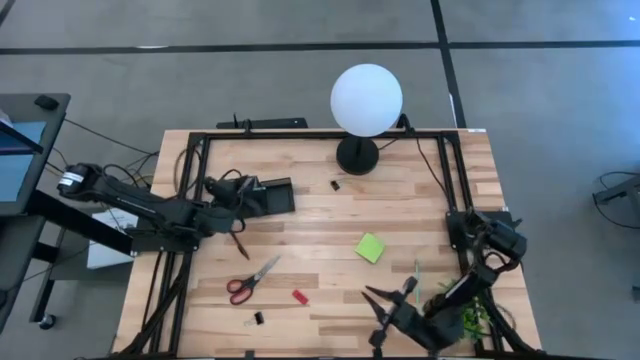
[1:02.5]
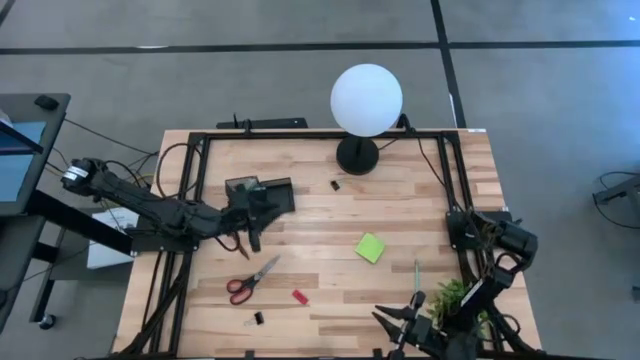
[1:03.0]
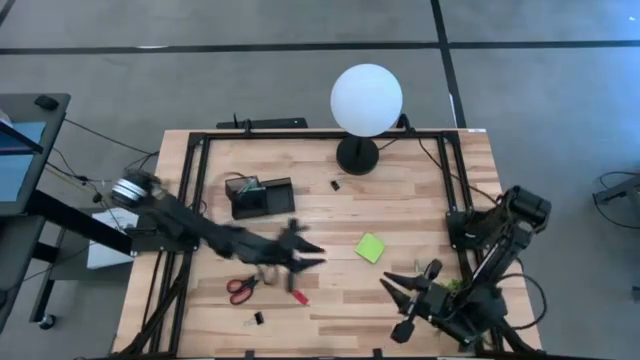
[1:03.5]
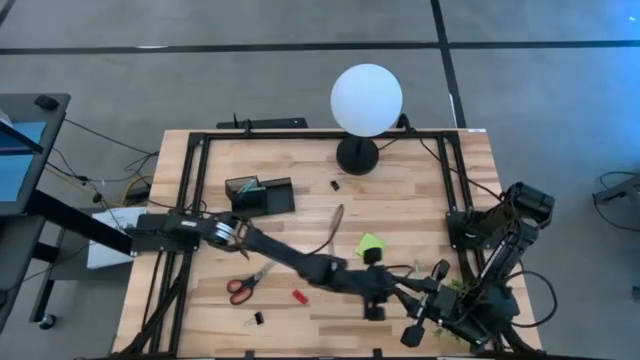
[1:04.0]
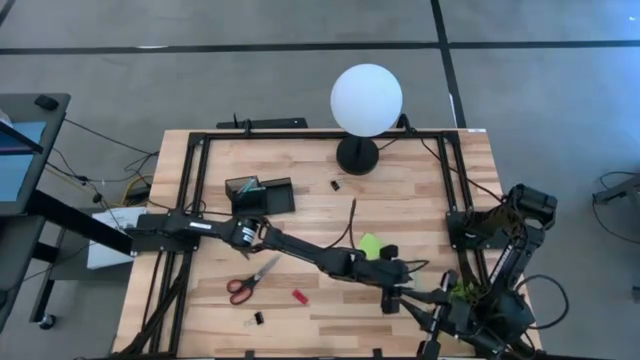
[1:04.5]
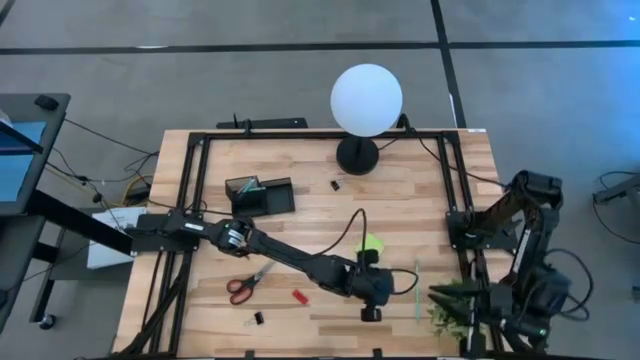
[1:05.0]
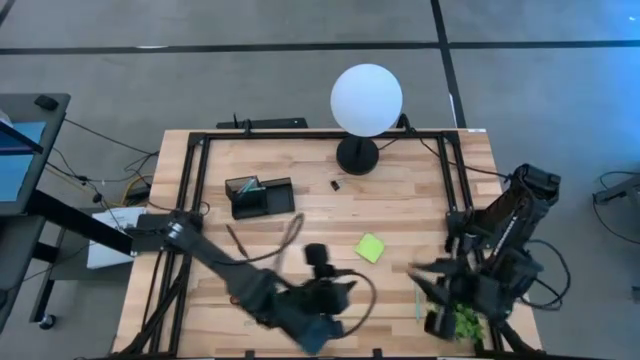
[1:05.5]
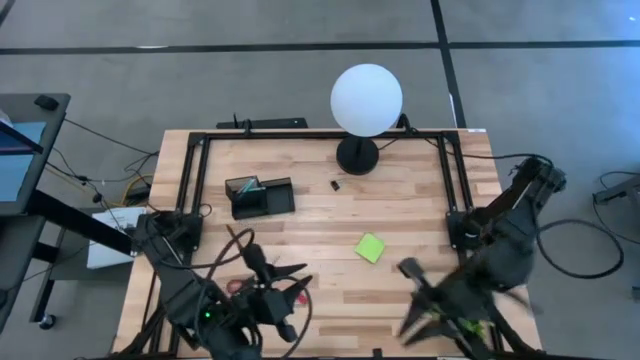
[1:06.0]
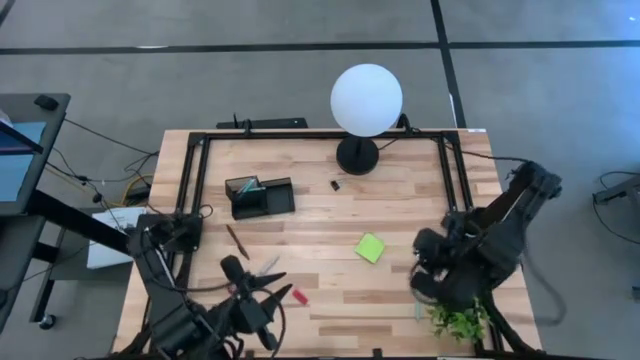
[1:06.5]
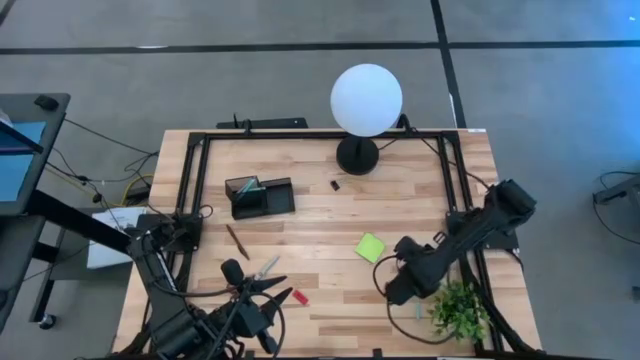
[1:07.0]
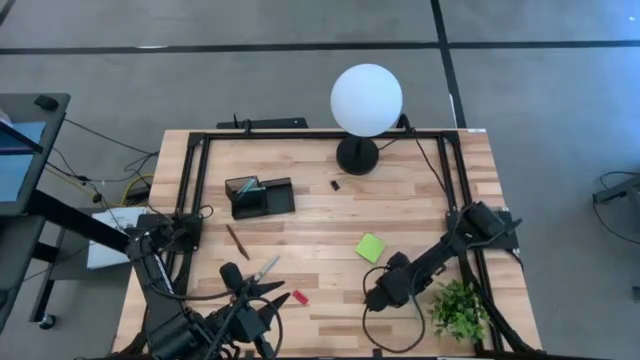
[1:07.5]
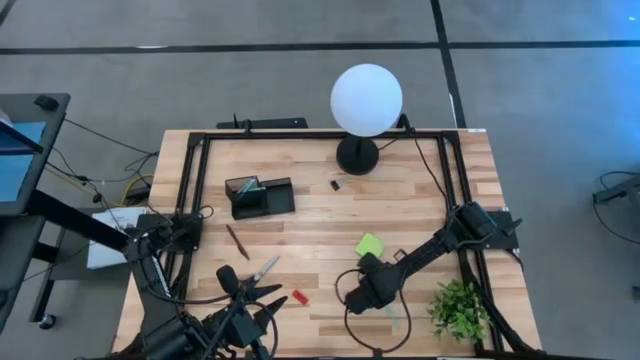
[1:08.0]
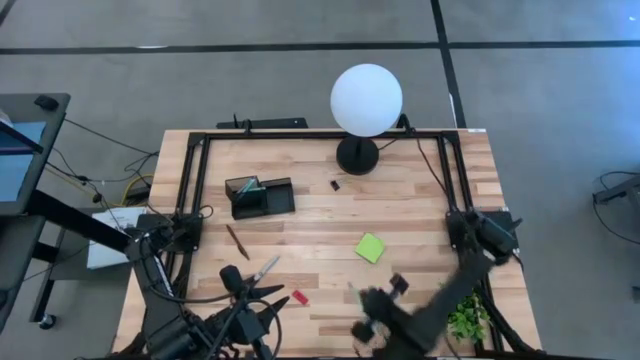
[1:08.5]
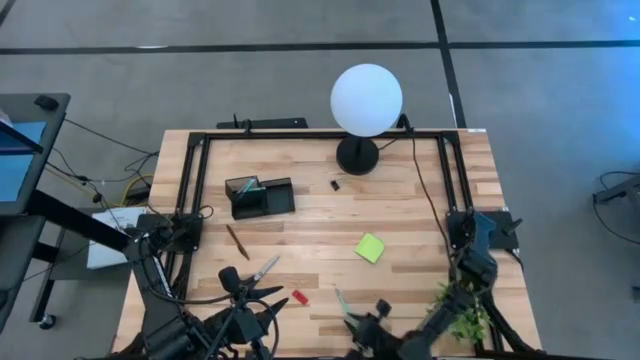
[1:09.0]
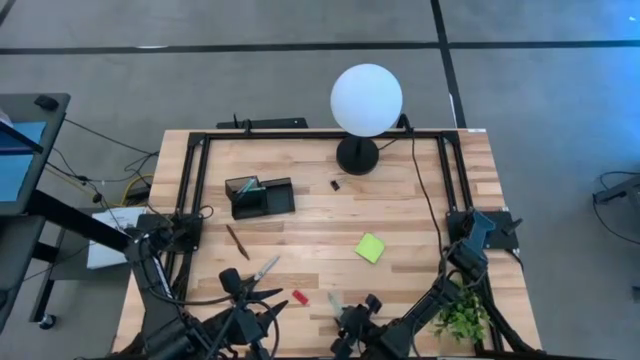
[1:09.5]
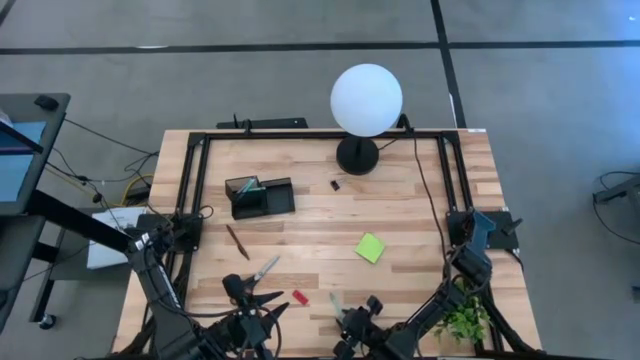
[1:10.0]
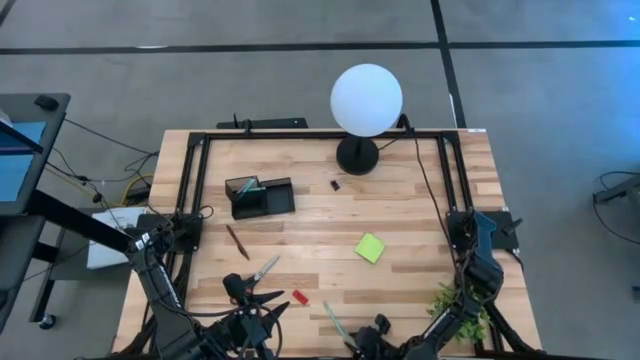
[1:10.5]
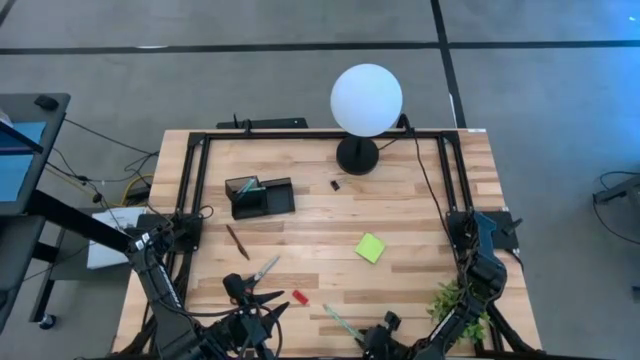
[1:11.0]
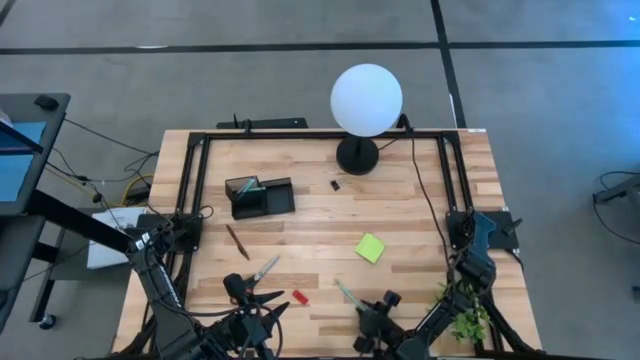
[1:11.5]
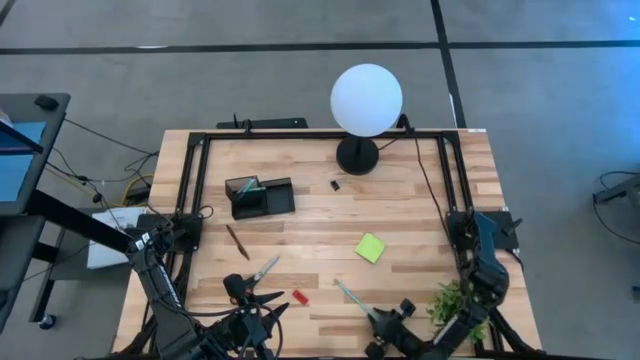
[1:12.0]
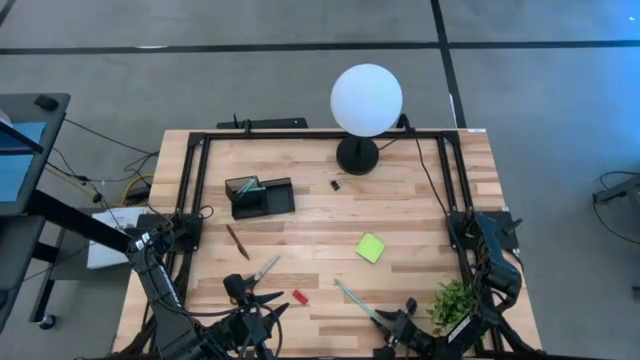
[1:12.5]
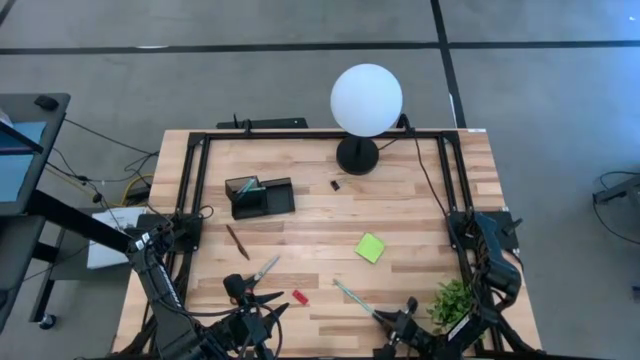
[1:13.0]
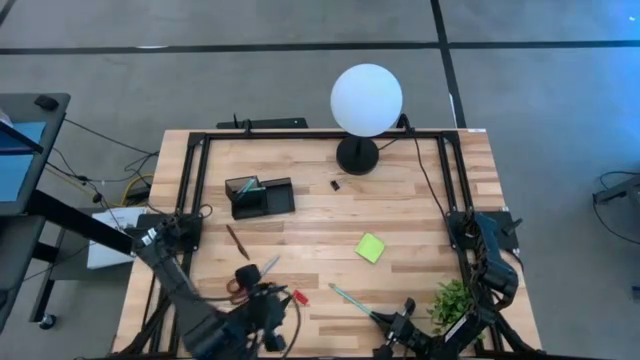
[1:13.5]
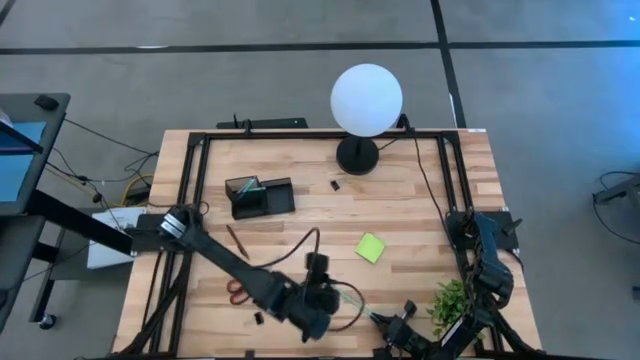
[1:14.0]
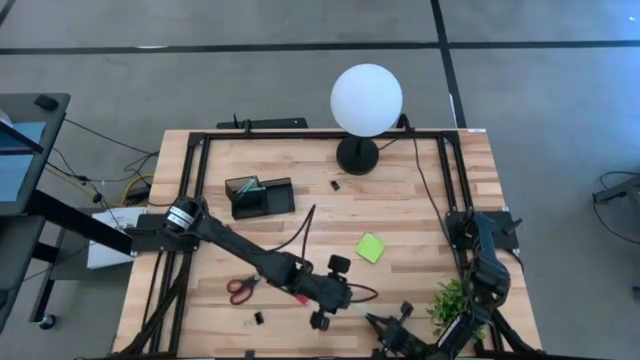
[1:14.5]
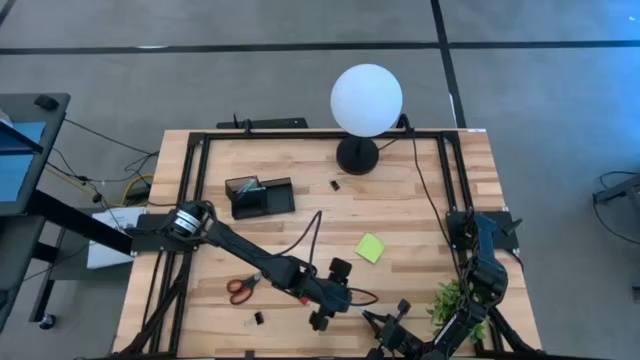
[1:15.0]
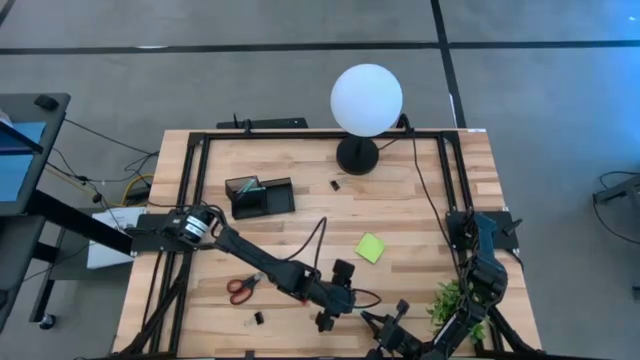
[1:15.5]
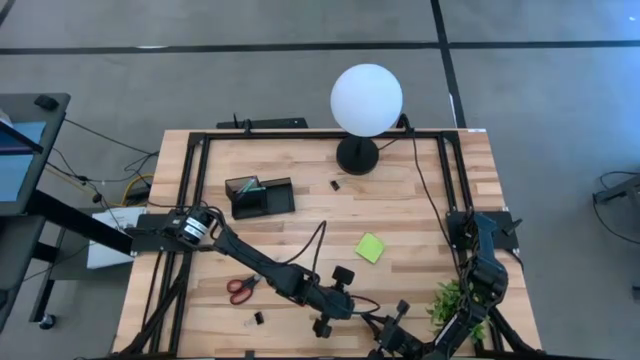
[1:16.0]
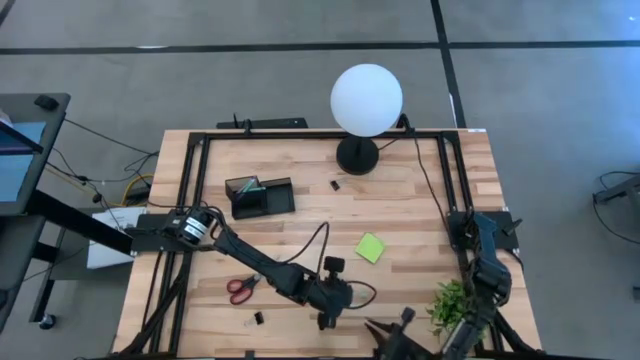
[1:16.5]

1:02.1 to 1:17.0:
Task: Pick and place office supplies into organizer
Put the blue pencil into the black desk organizer

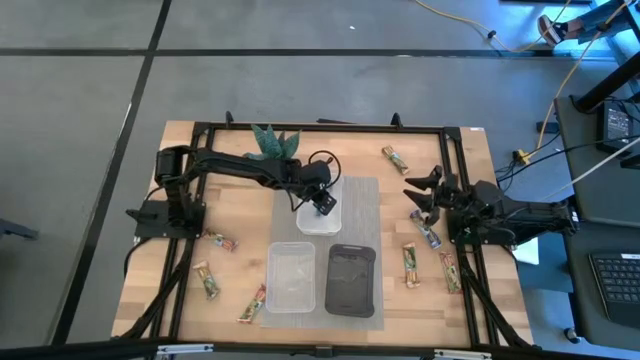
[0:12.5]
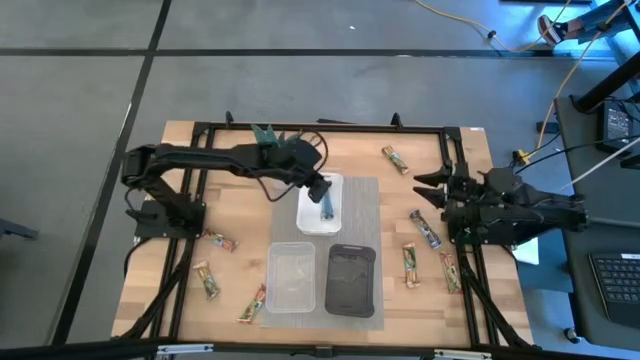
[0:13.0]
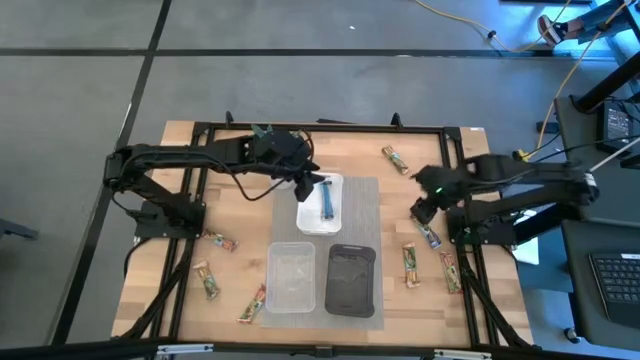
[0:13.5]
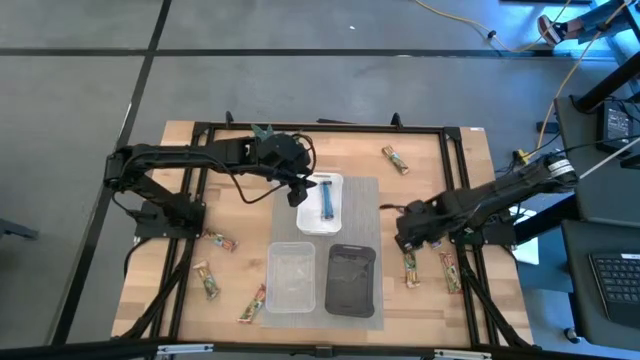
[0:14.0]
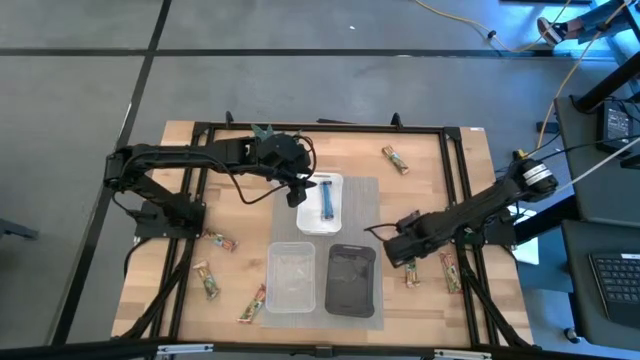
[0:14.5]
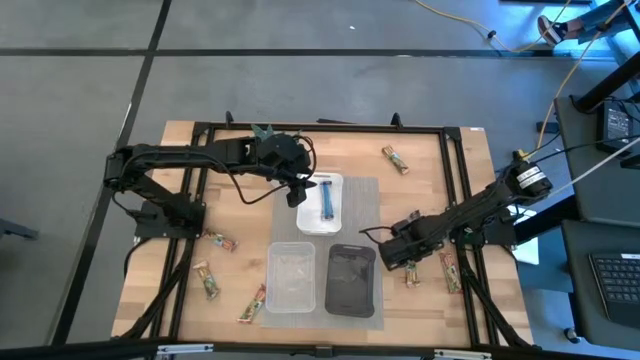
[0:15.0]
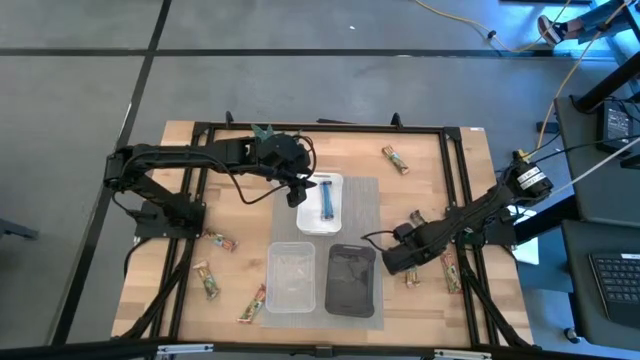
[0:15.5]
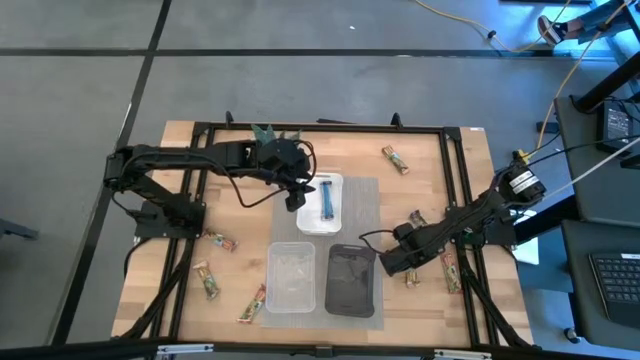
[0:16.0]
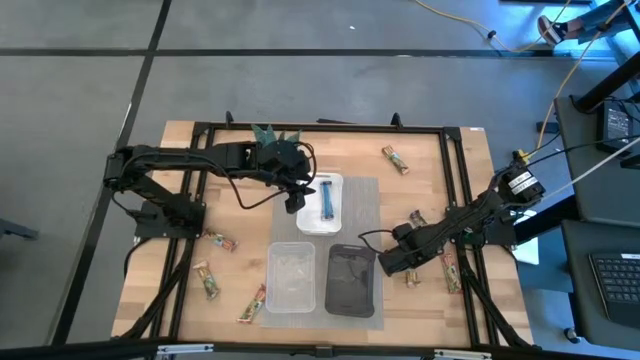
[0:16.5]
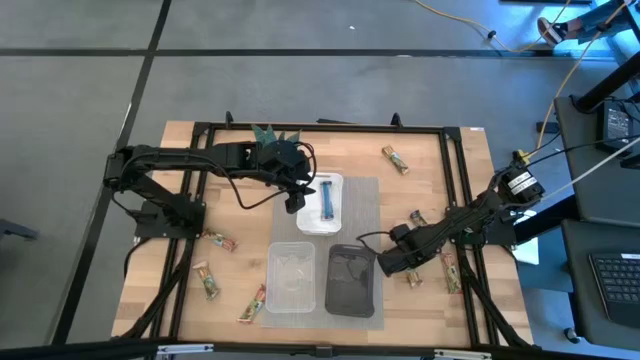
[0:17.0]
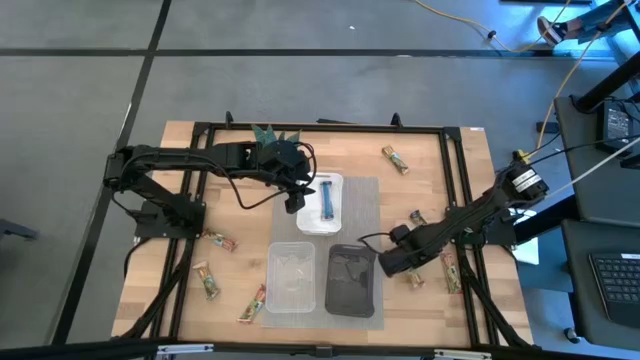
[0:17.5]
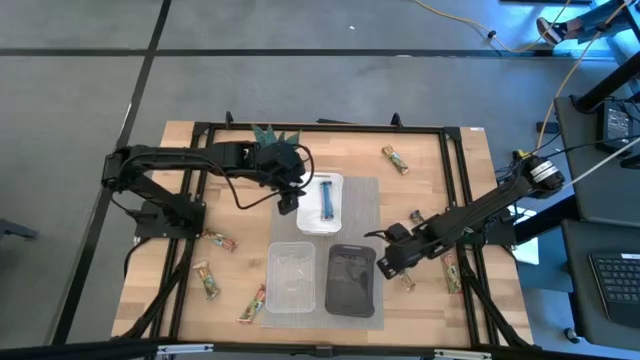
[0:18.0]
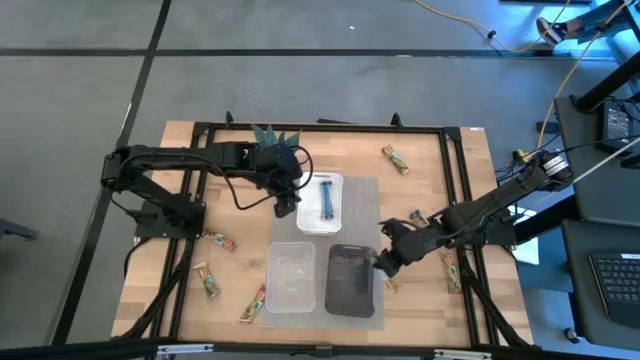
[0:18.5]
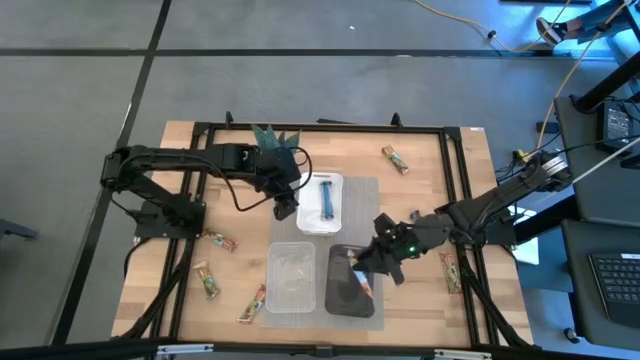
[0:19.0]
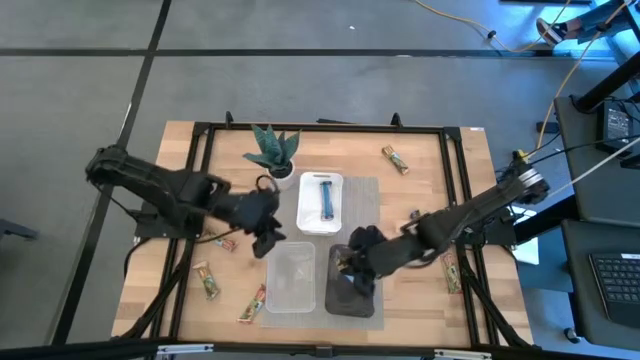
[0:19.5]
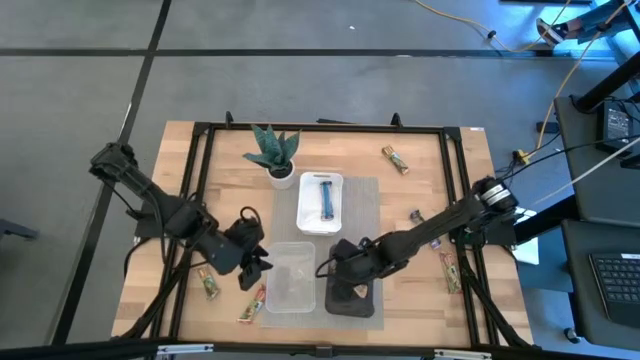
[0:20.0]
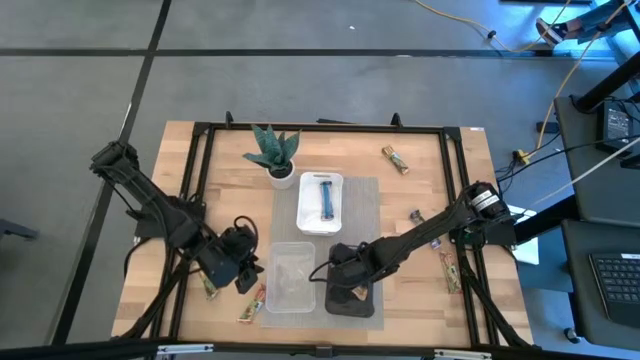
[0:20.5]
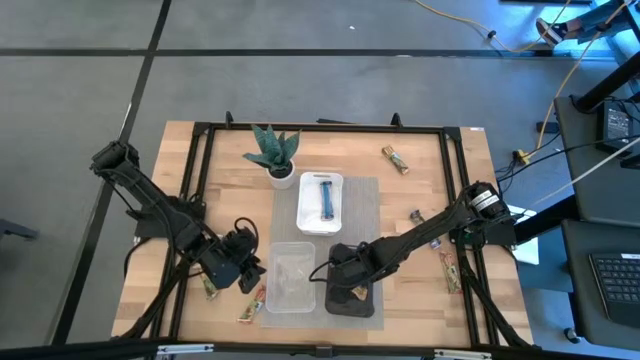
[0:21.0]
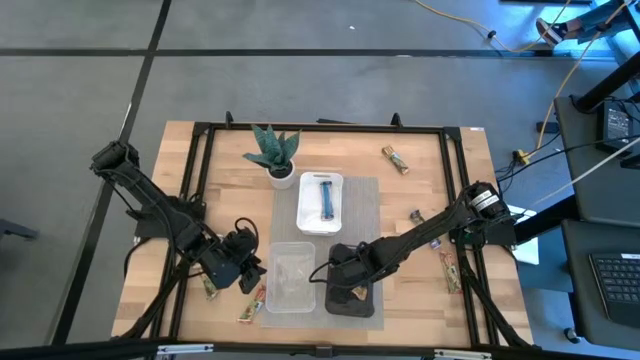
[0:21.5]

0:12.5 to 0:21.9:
Task: Pick and place Granola Bars by type
Put the bottom right yellow granola bar into the black bin
